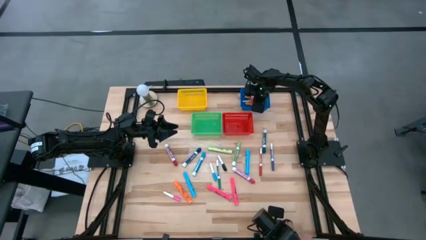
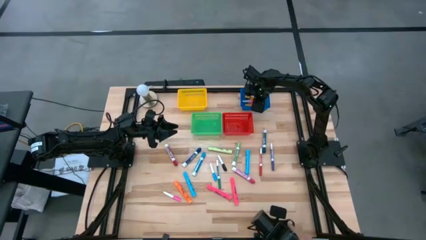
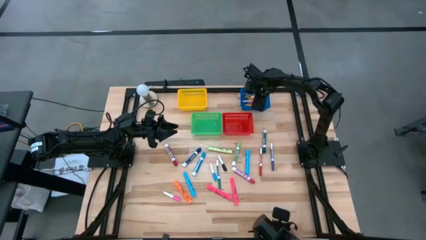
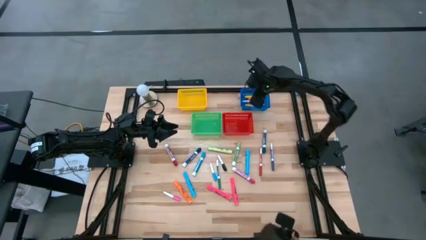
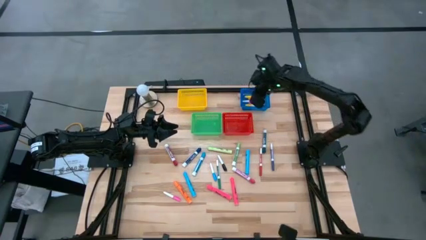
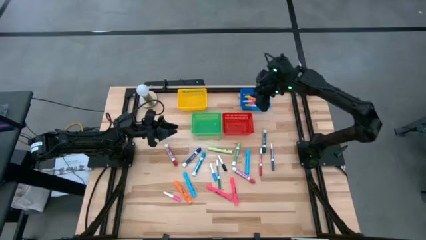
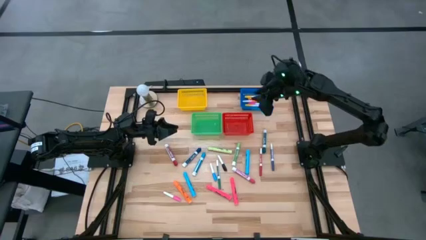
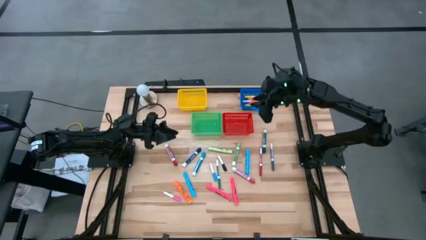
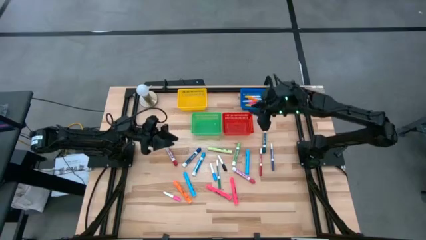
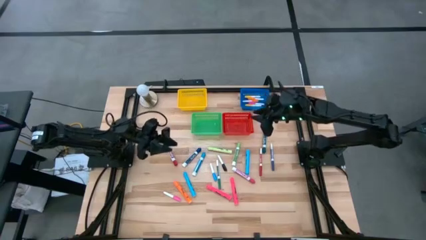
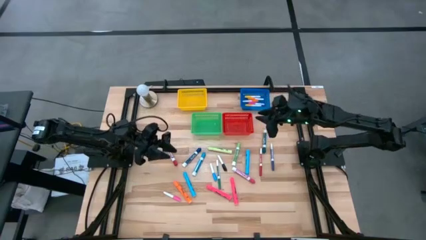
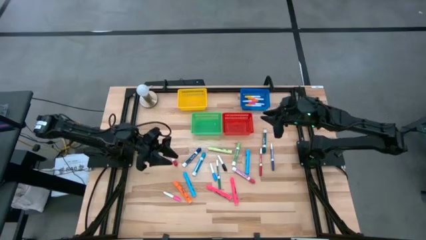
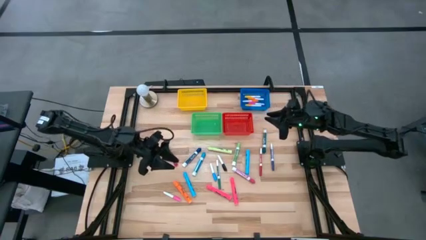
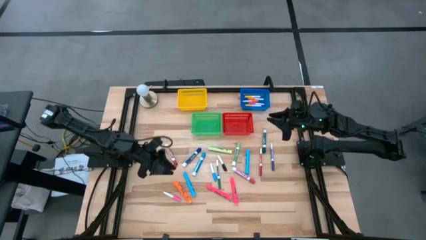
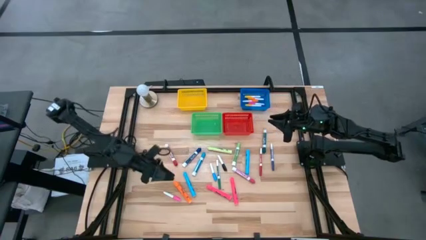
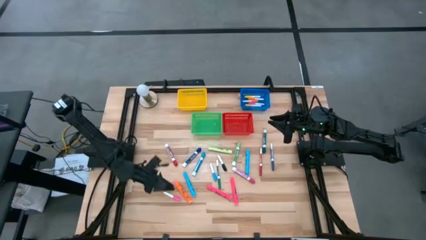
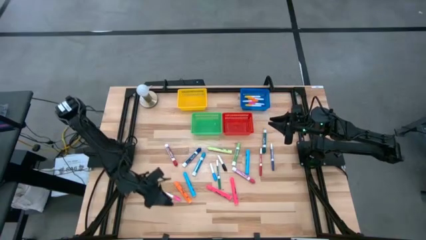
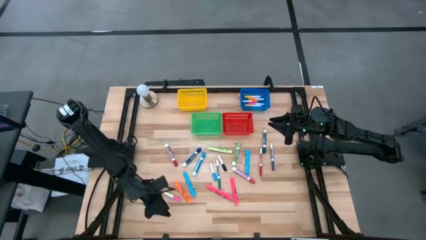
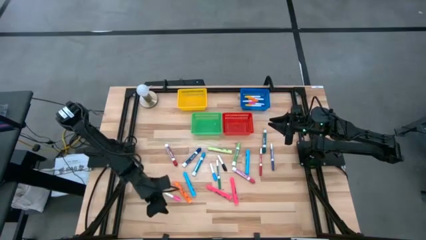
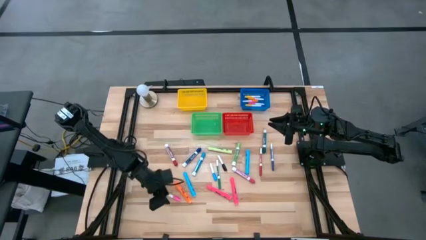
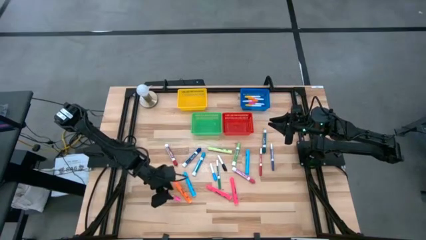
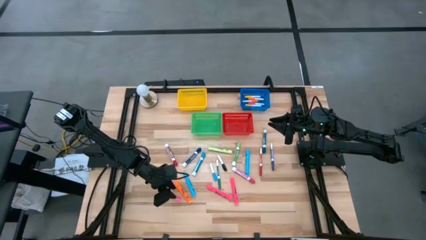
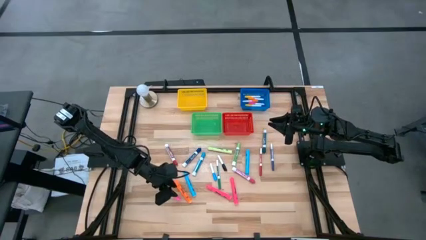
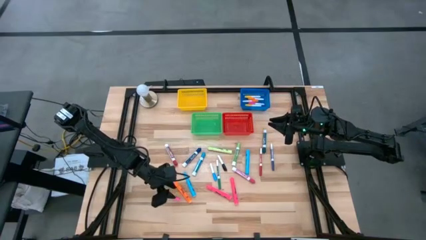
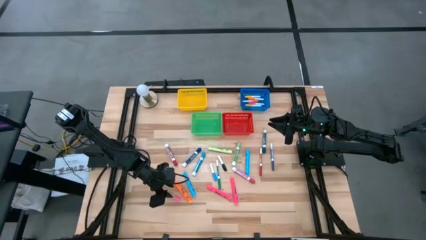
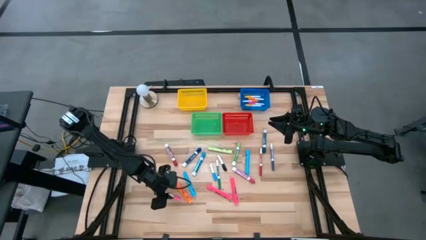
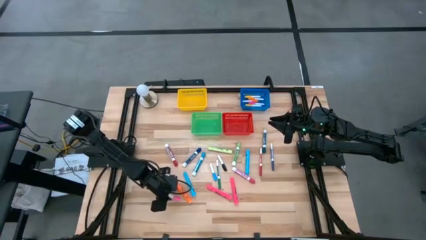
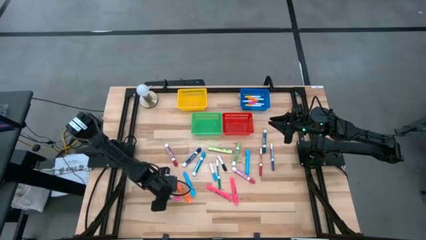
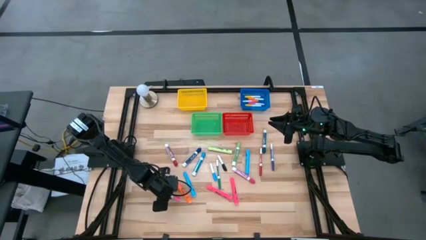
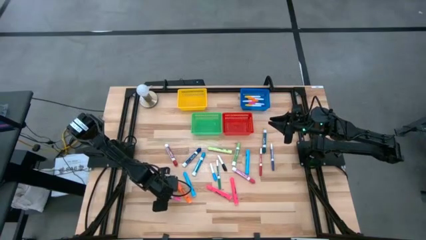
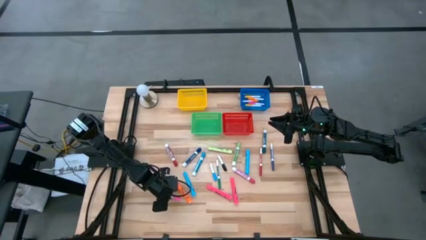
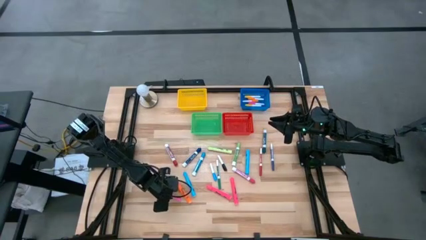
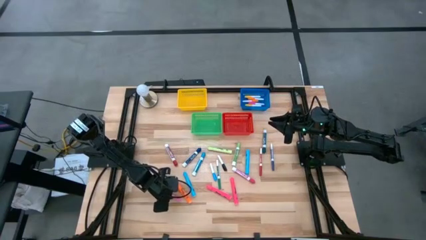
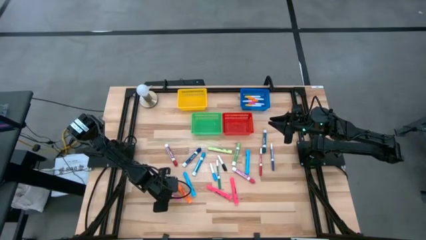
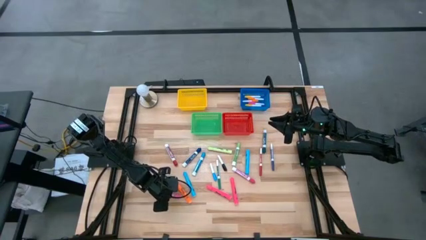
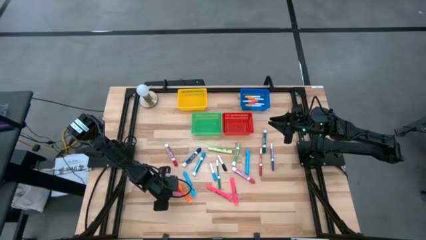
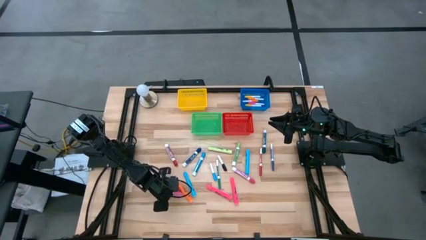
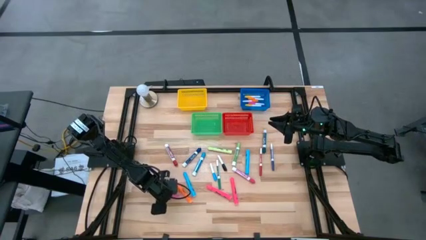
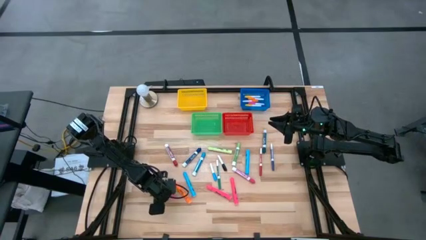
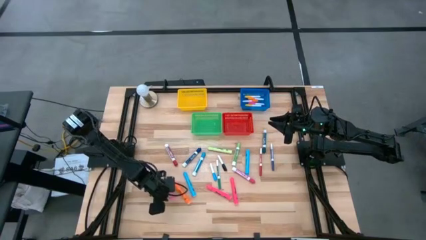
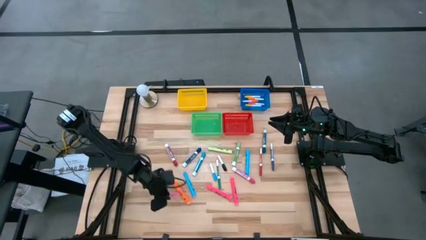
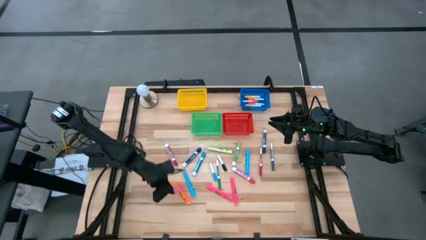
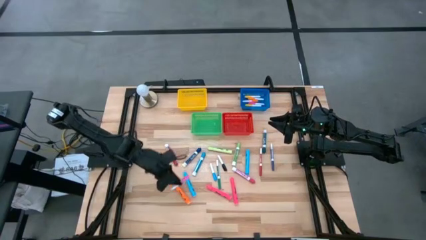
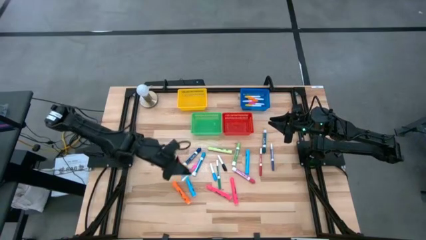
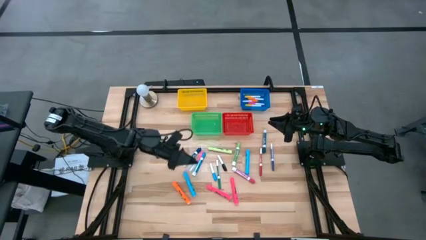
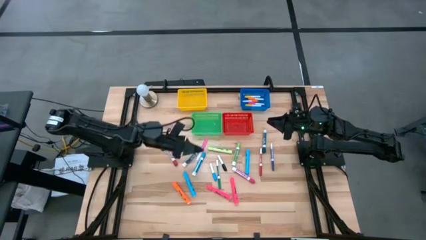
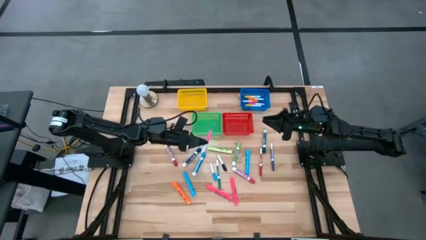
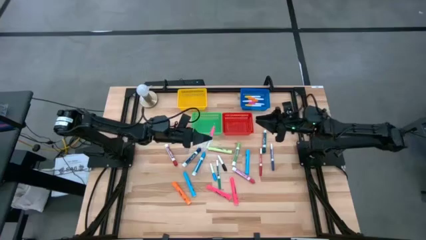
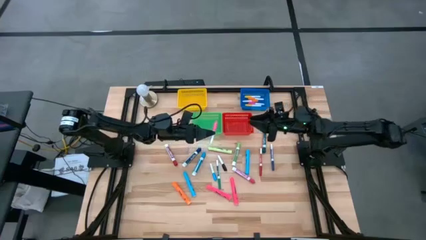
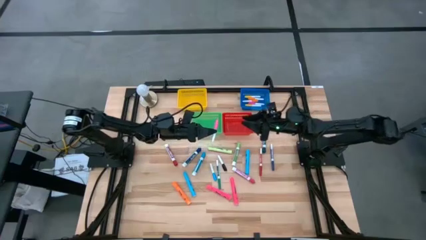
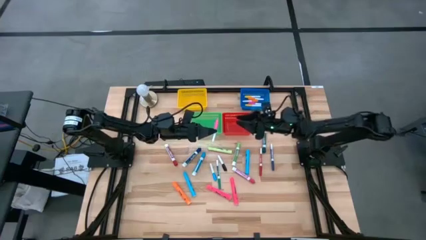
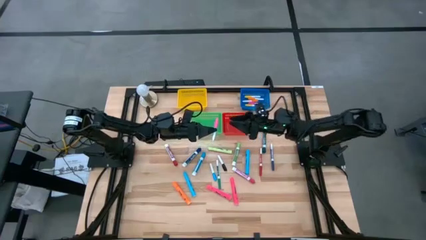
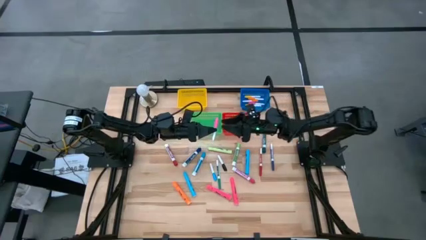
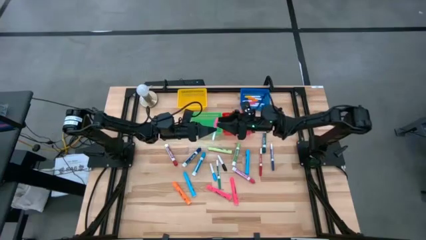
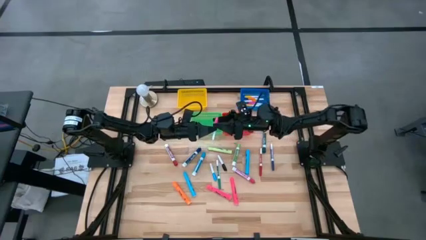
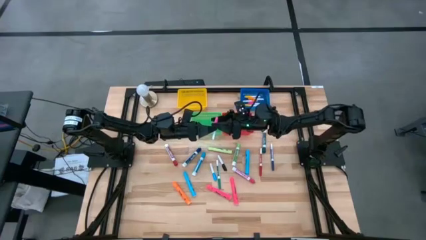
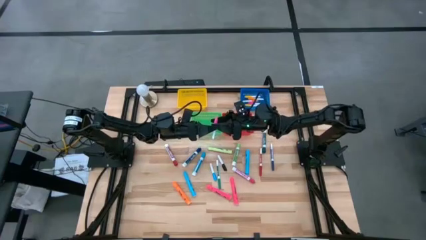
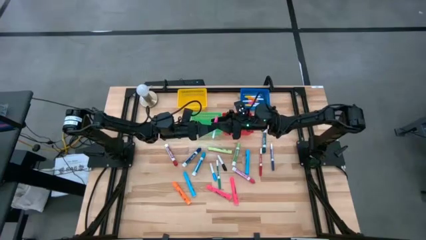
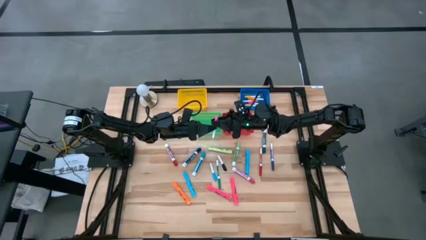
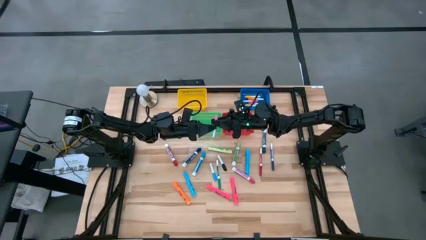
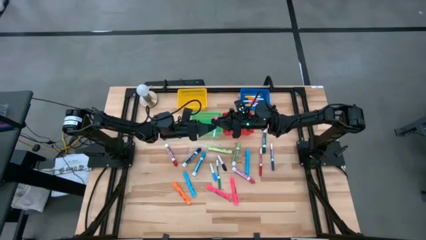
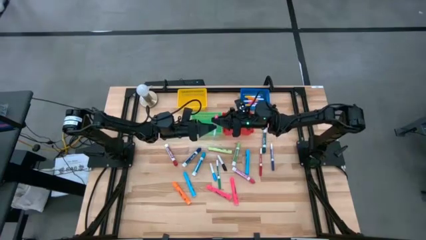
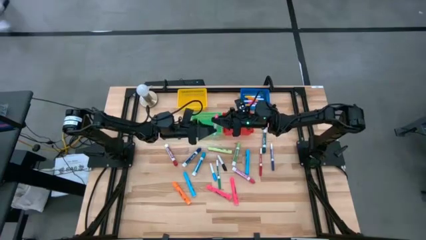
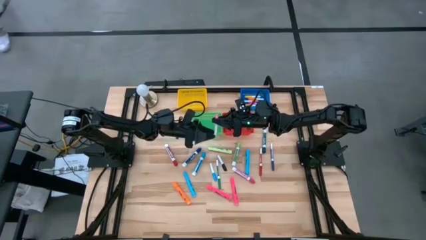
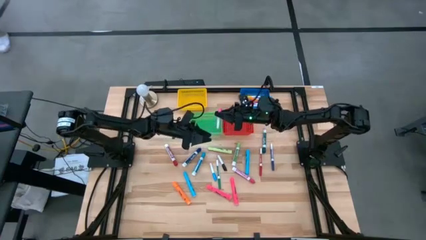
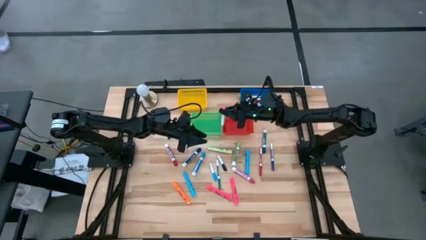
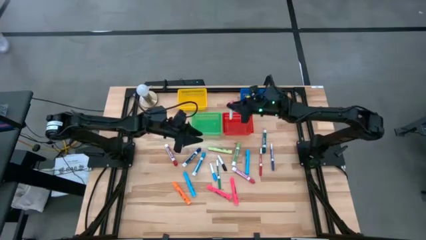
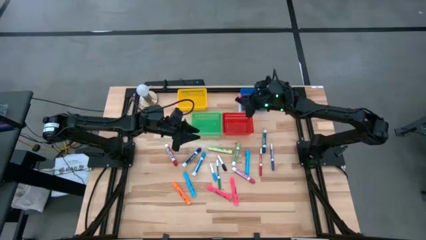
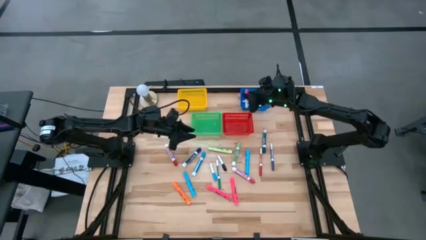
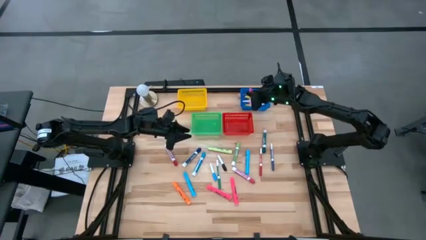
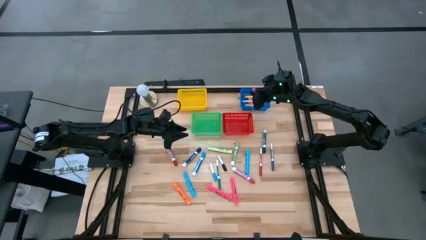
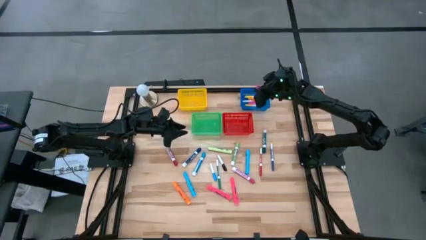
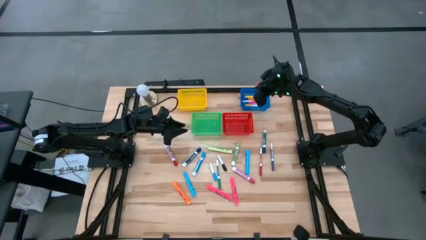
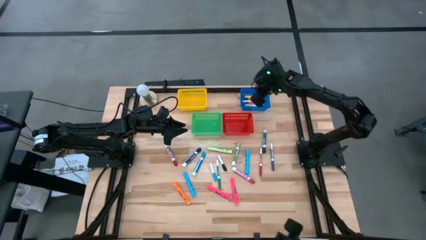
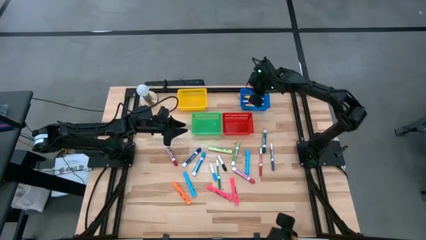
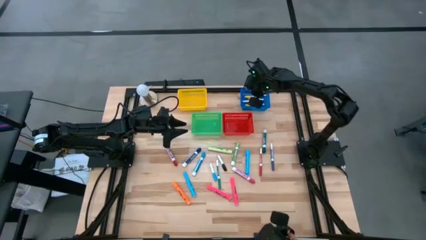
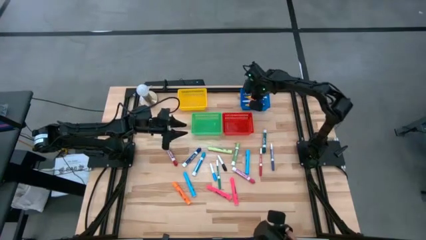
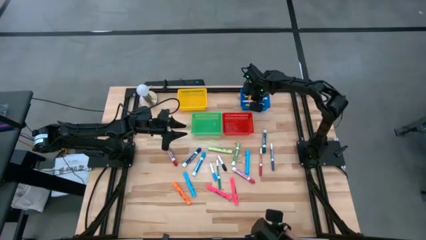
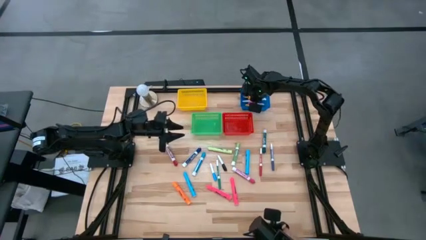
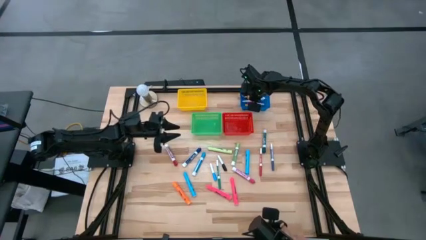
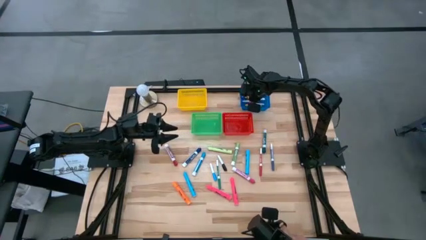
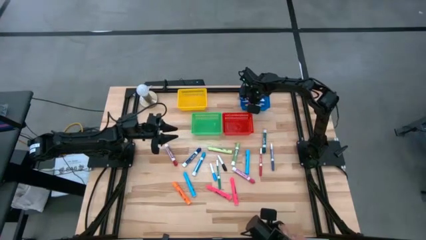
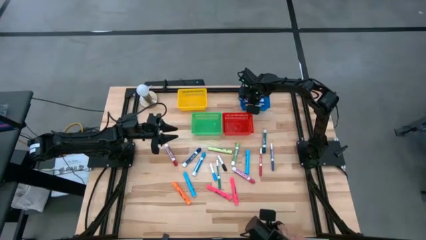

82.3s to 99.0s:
Task: Pick & Place Markers
Put the pink highlighter into the blue bin
